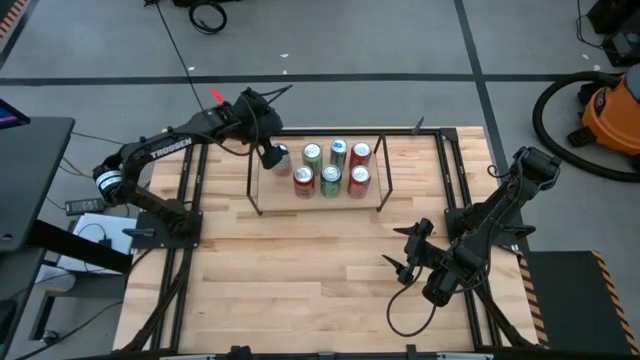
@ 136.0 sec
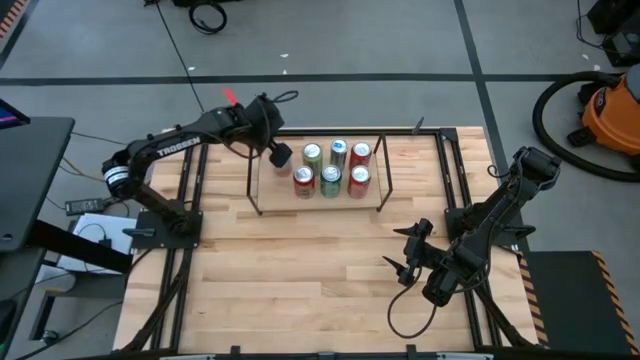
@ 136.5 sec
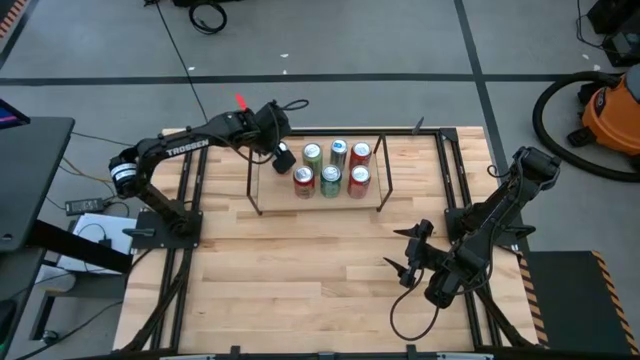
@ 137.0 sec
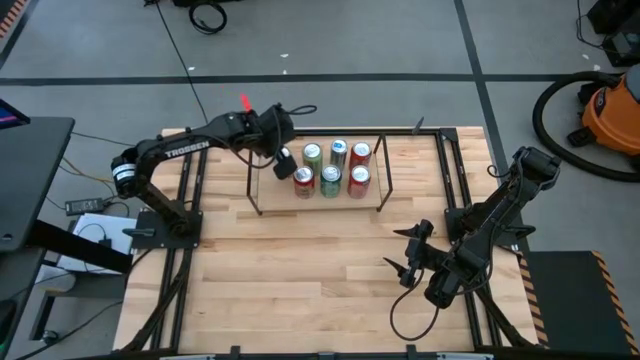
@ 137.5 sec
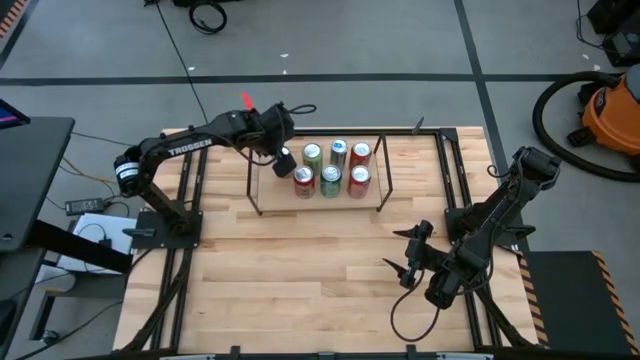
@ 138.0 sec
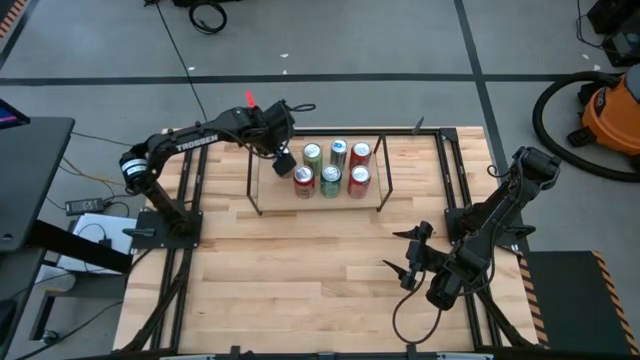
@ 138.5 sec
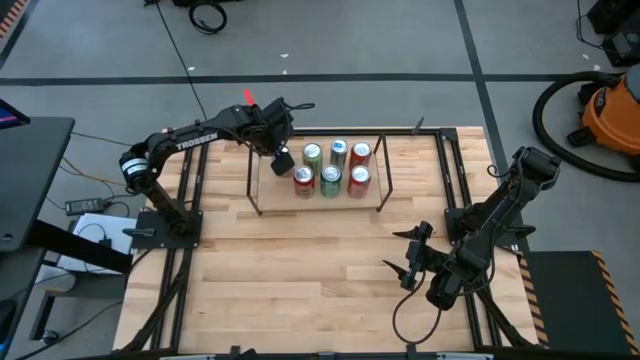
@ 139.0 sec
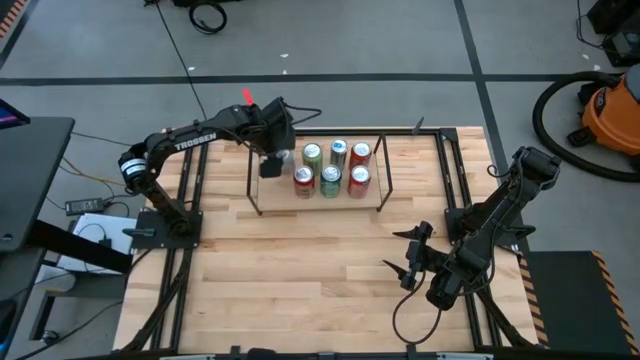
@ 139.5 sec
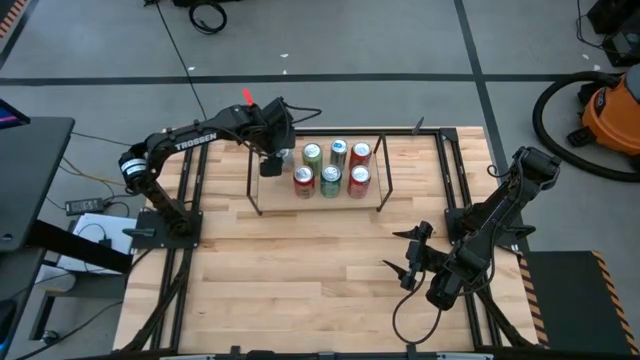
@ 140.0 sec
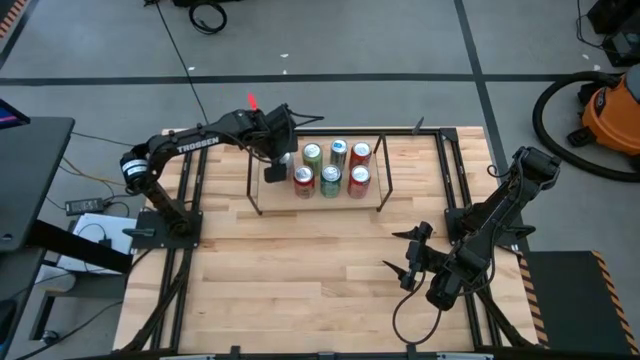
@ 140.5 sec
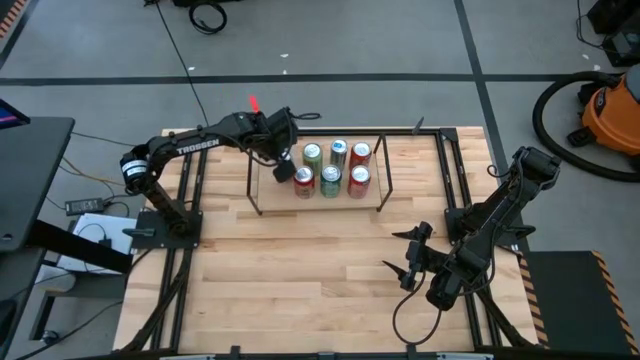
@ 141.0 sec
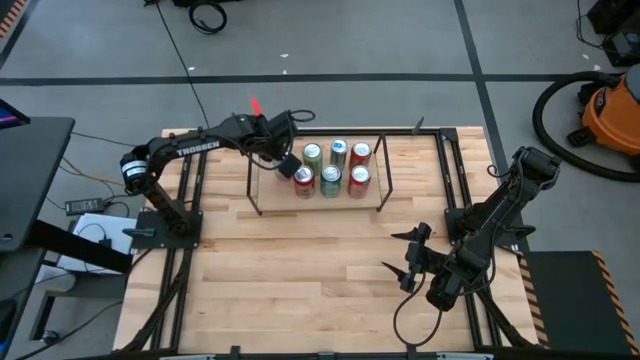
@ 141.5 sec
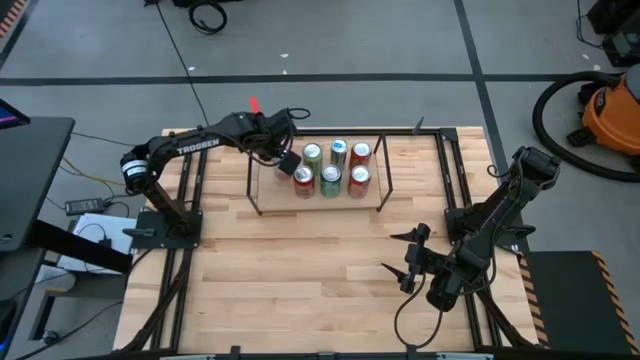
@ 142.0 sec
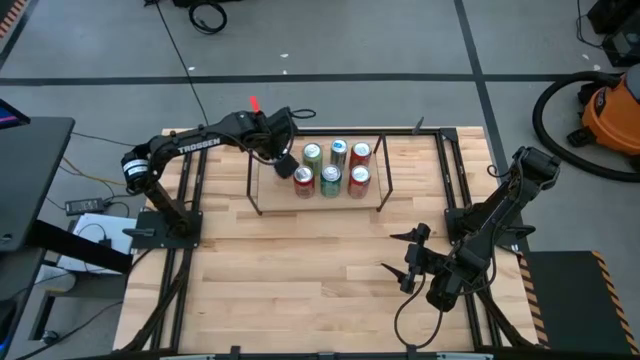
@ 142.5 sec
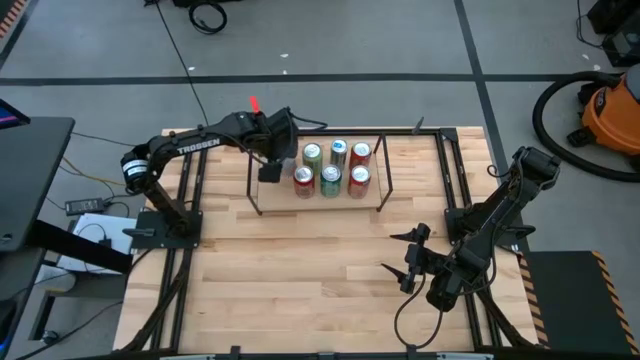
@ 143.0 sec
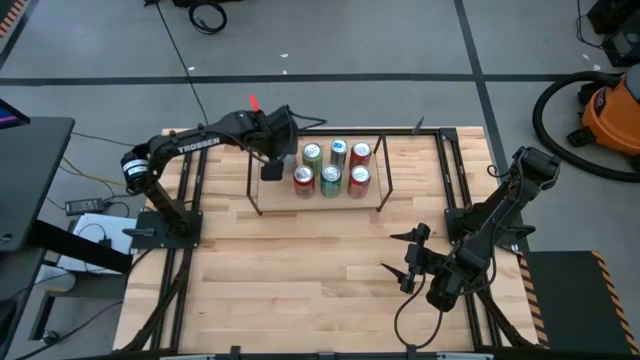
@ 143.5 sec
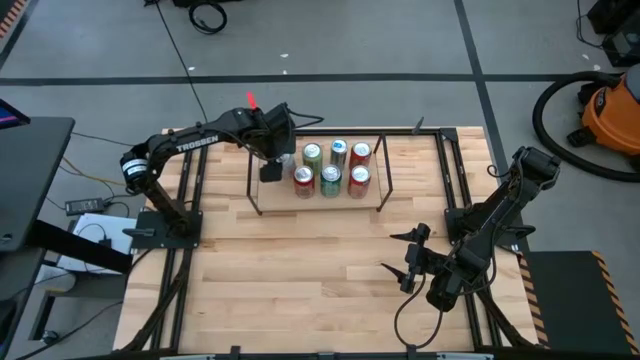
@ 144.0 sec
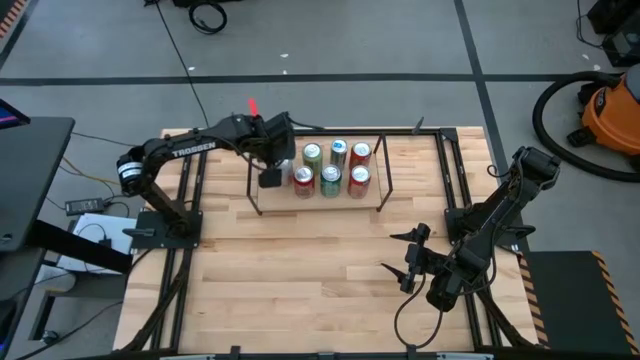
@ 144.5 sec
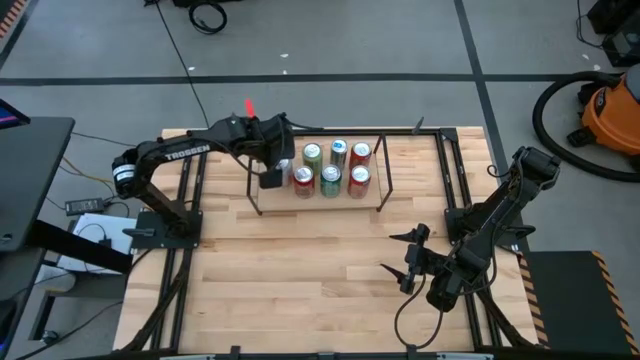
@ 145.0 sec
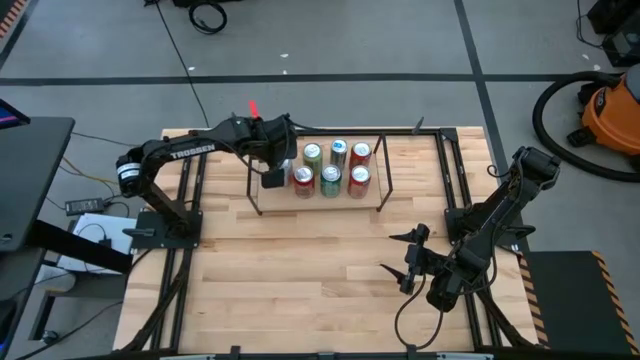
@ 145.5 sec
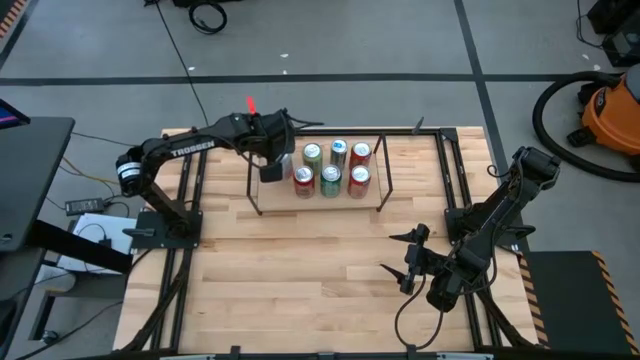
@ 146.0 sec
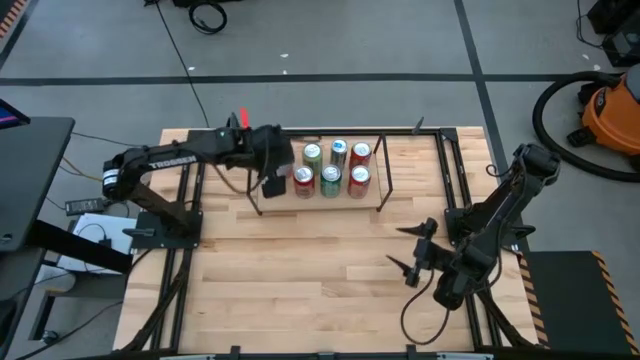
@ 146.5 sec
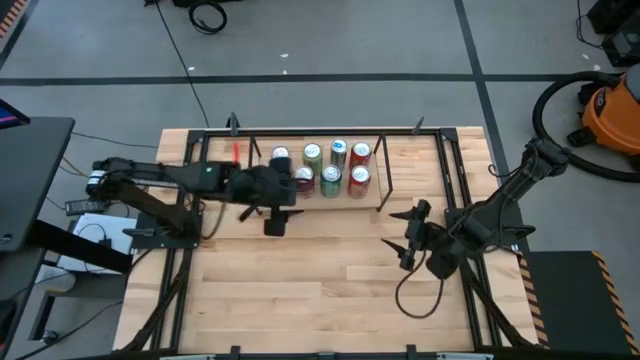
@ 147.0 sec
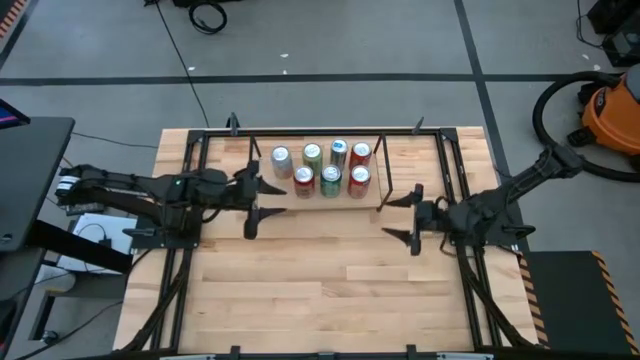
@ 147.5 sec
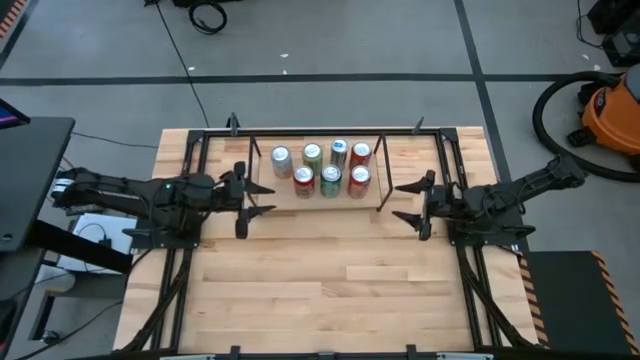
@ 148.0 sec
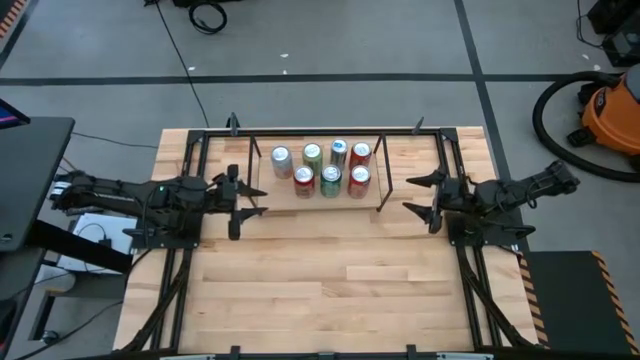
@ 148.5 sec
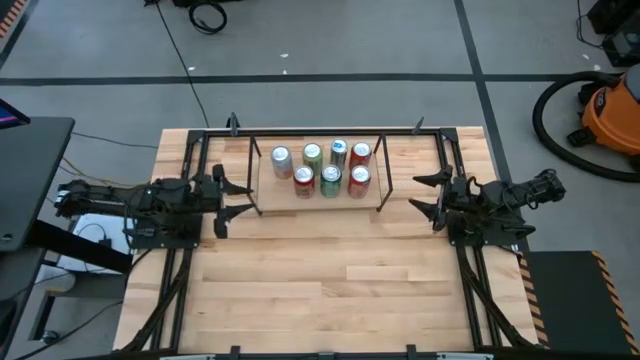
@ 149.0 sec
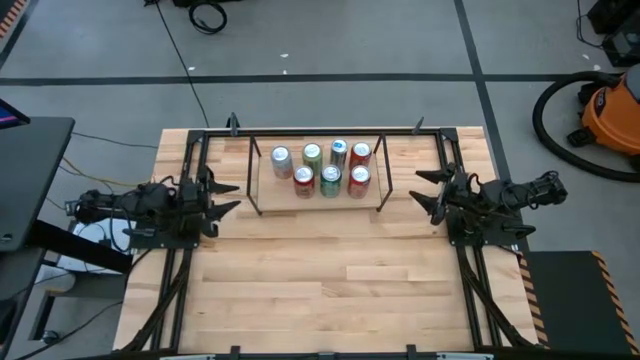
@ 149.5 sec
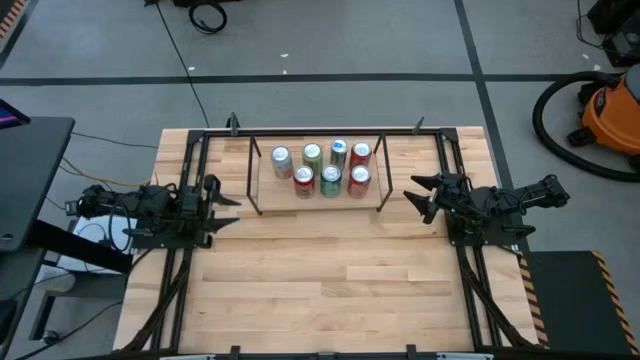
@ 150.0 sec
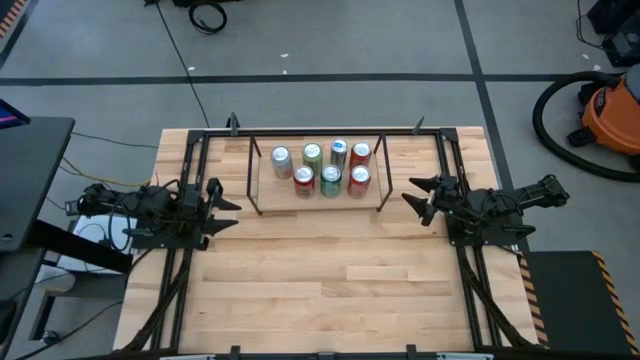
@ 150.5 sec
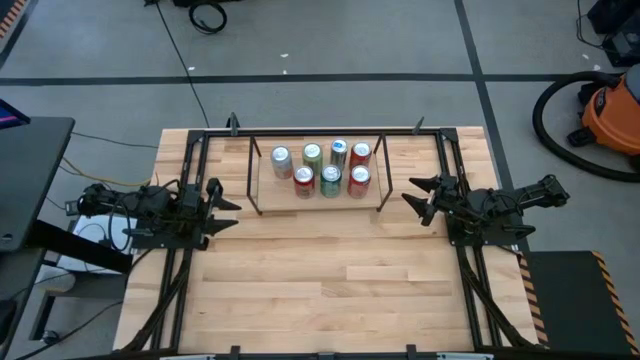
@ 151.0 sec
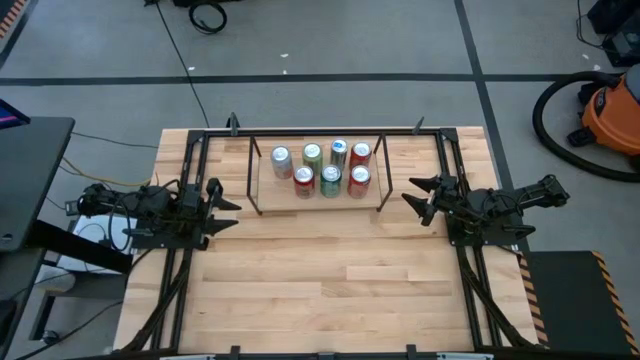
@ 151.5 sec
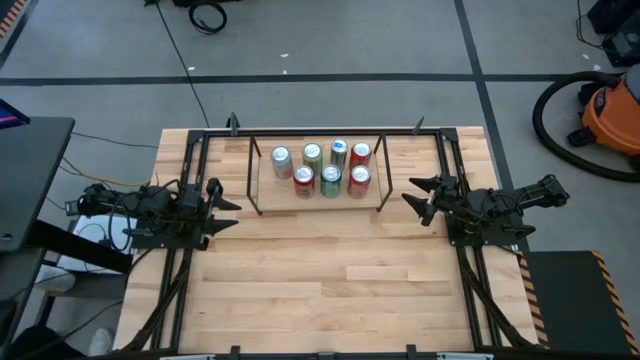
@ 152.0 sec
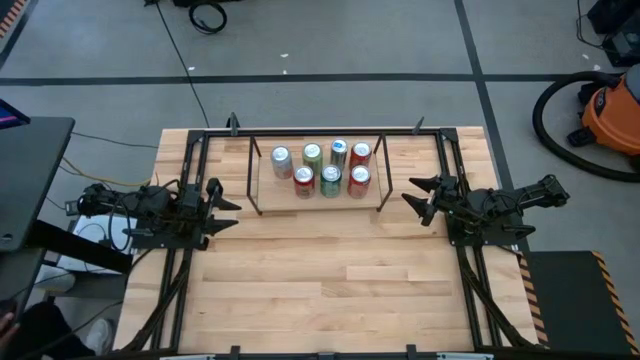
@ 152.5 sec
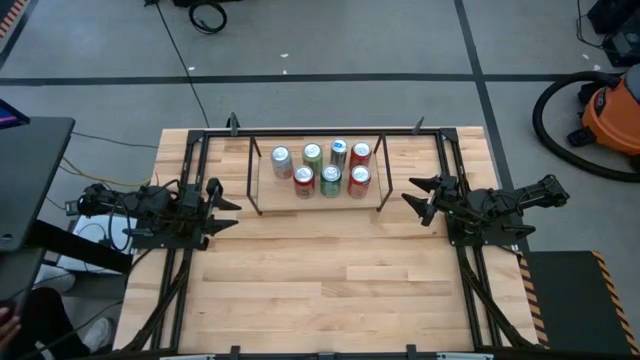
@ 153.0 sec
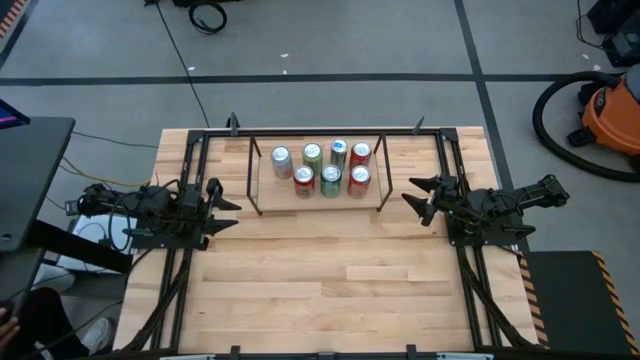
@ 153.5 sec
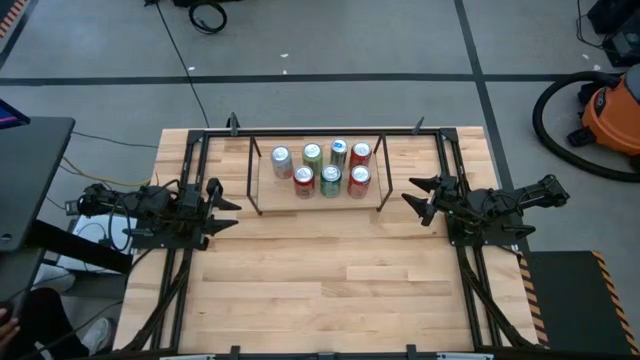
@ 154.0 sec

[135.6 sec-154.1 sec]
Task: Place canned beverage on shelf
Return to Home Position
